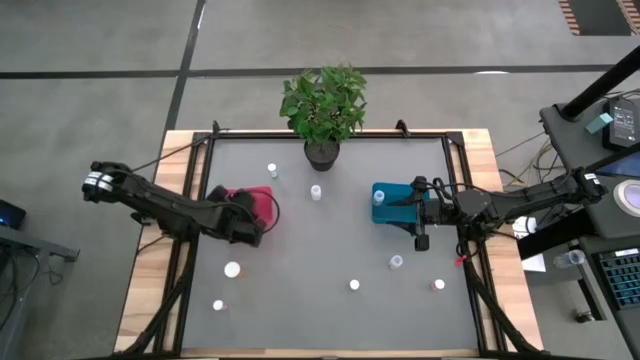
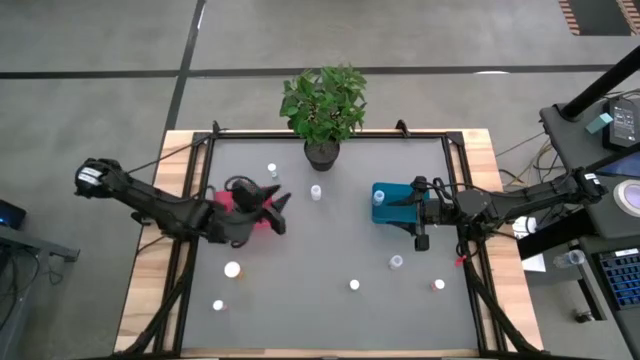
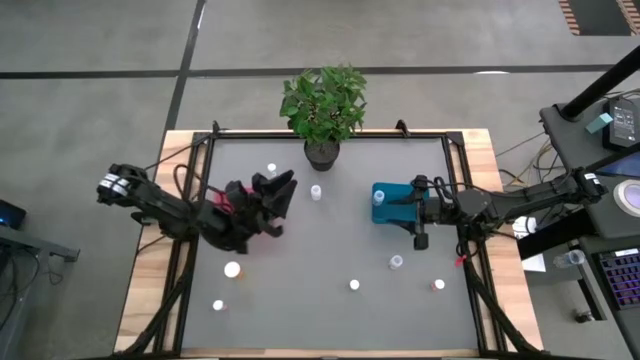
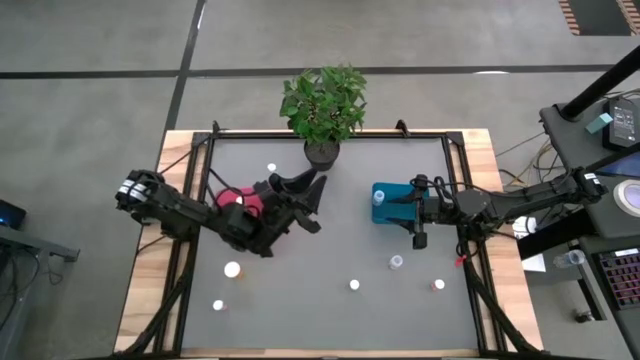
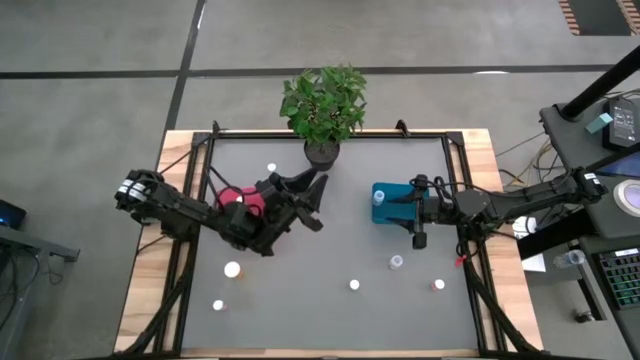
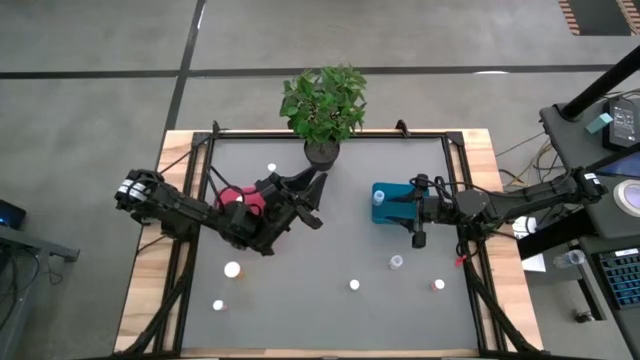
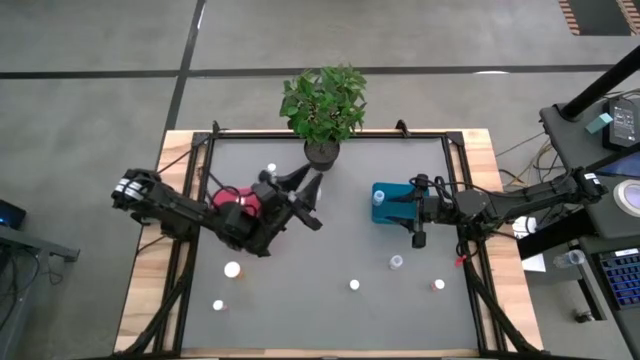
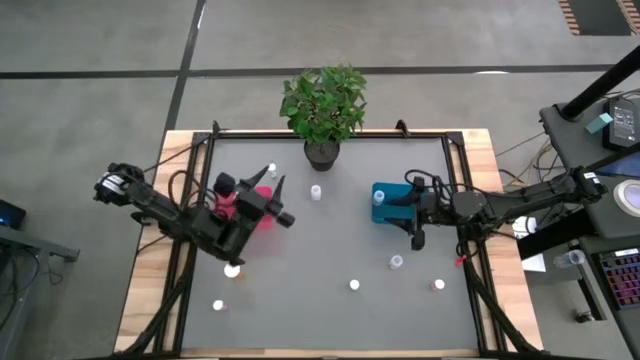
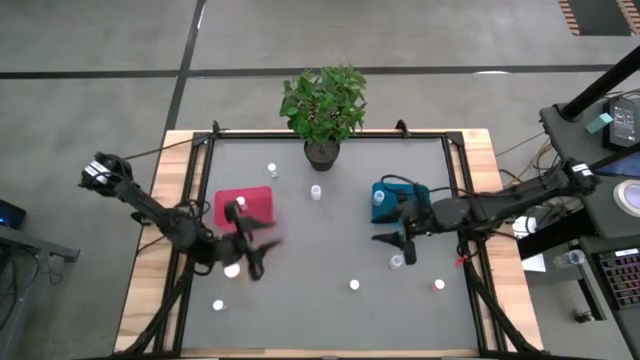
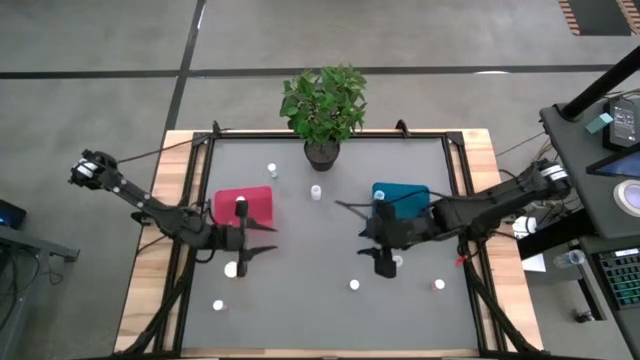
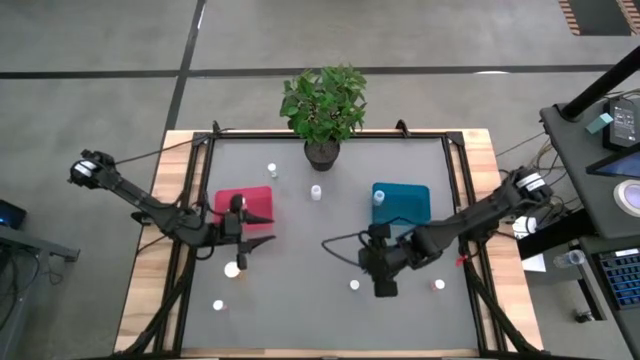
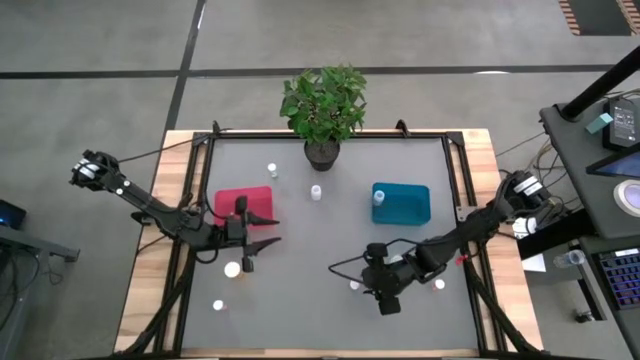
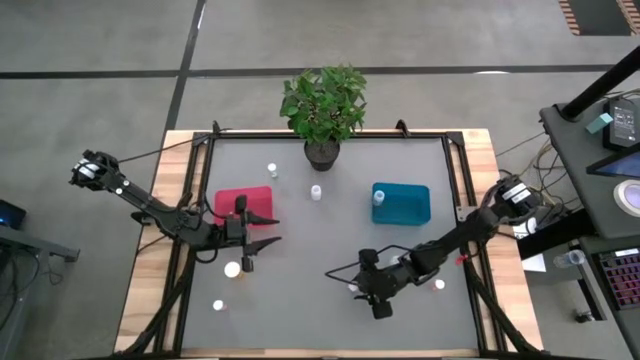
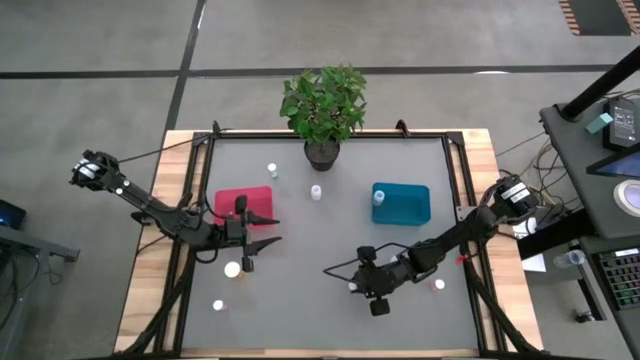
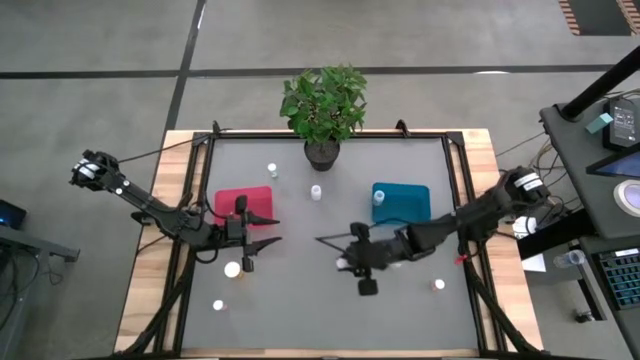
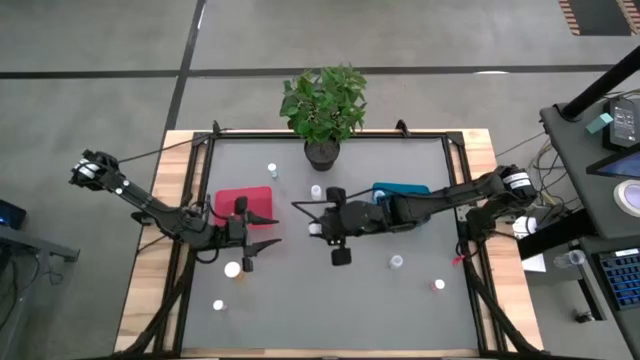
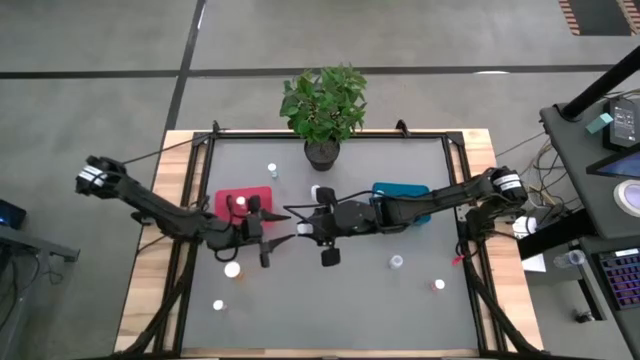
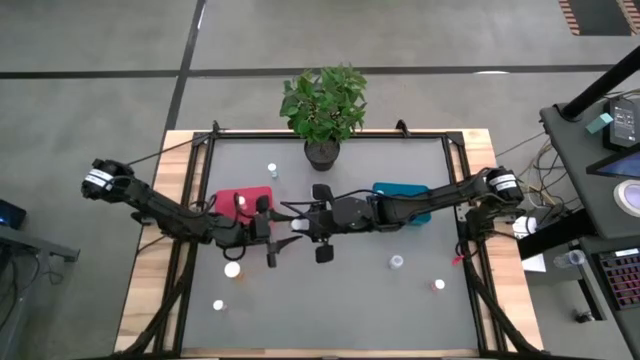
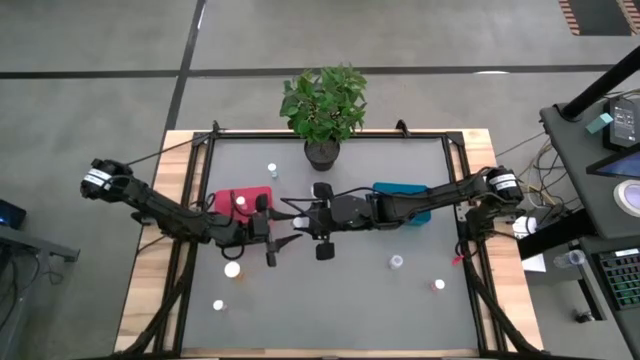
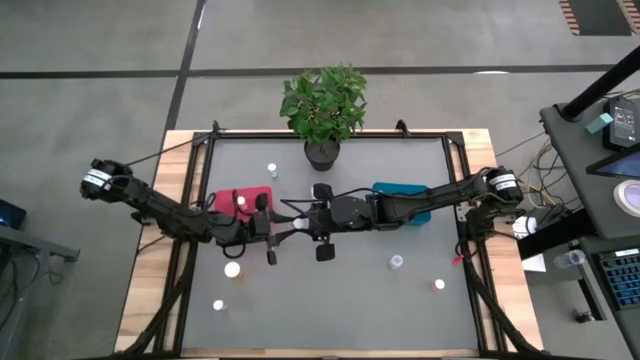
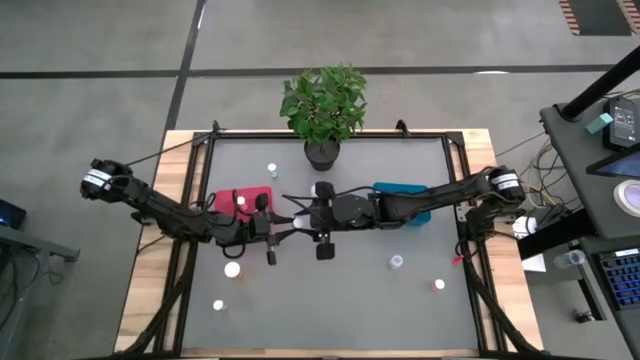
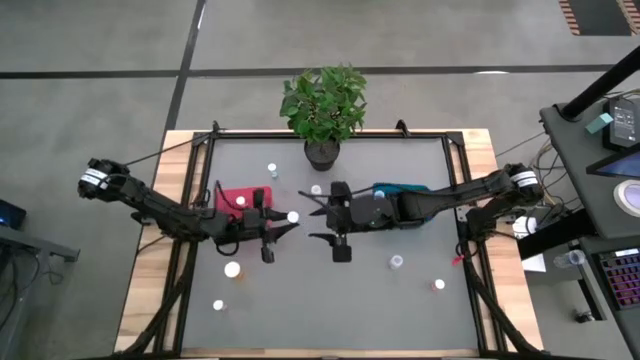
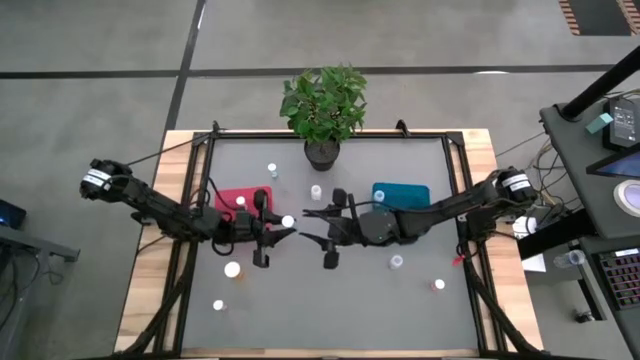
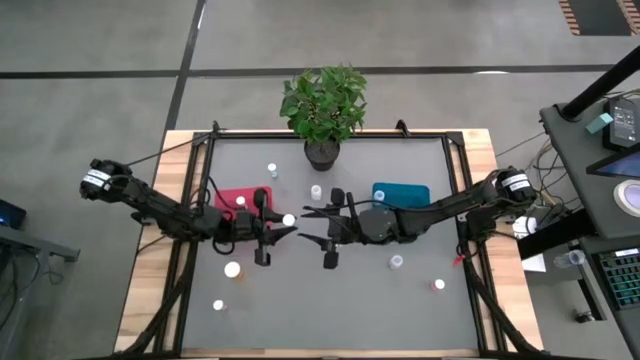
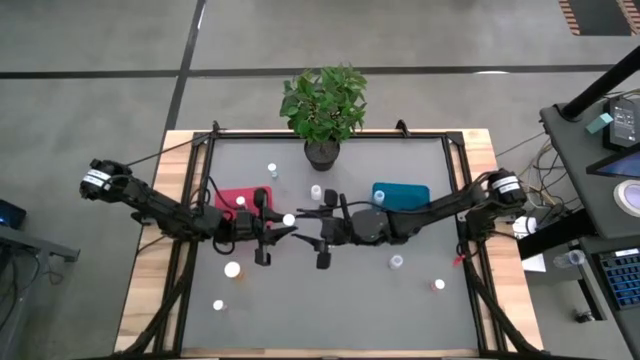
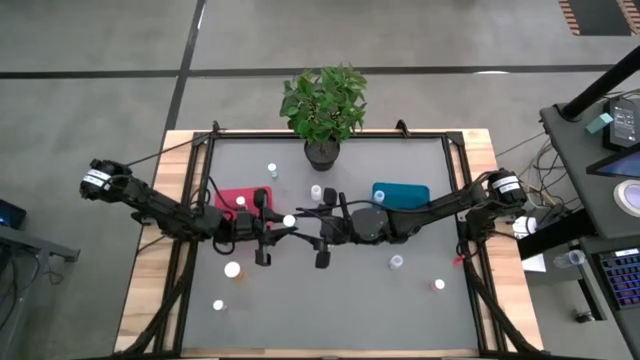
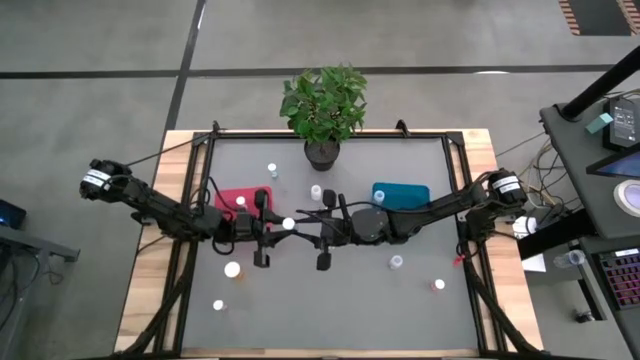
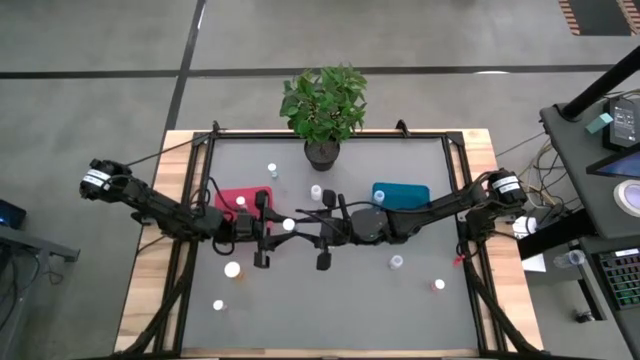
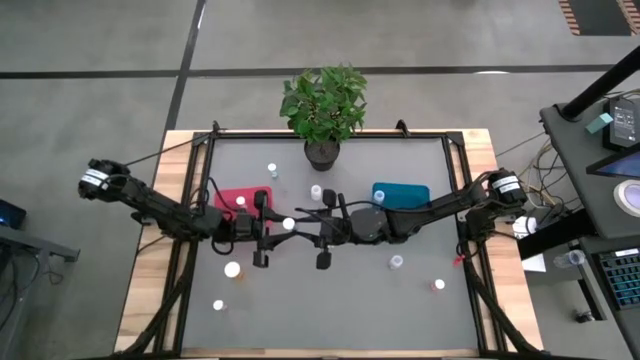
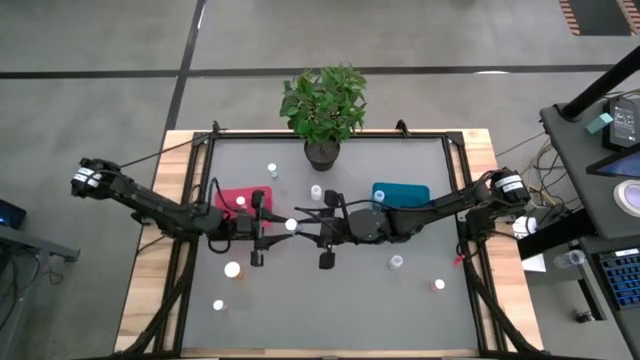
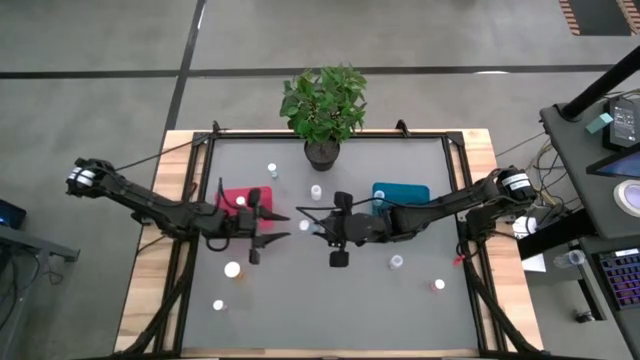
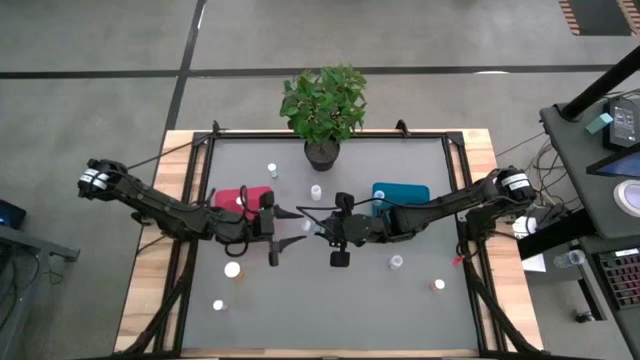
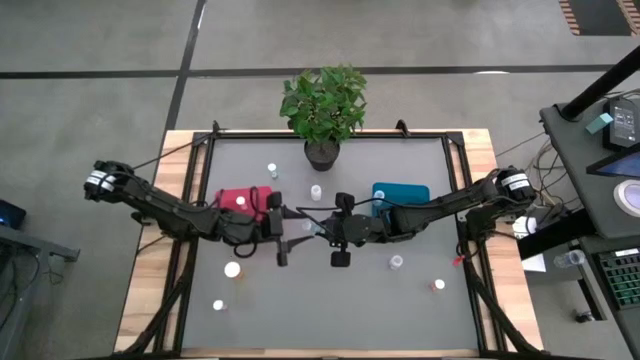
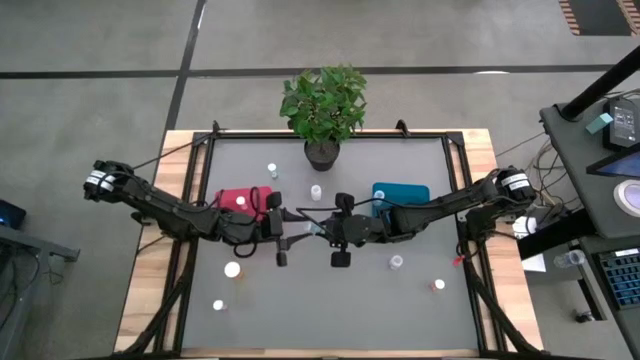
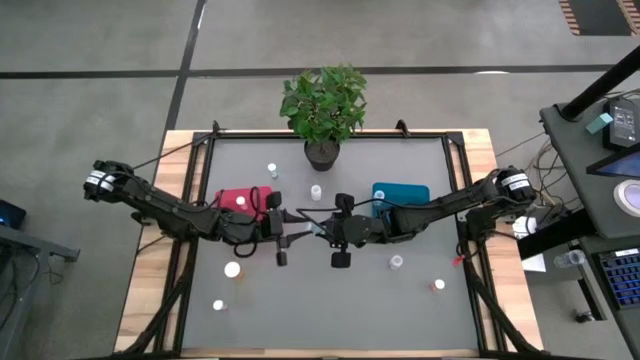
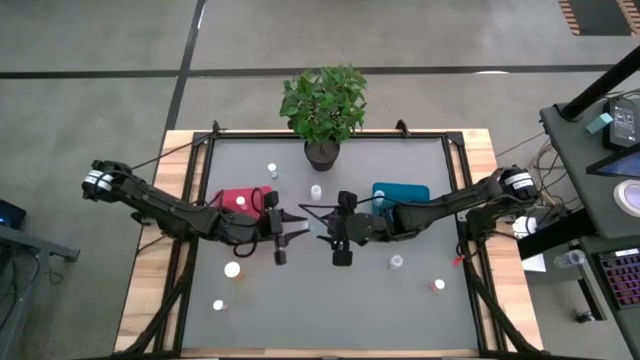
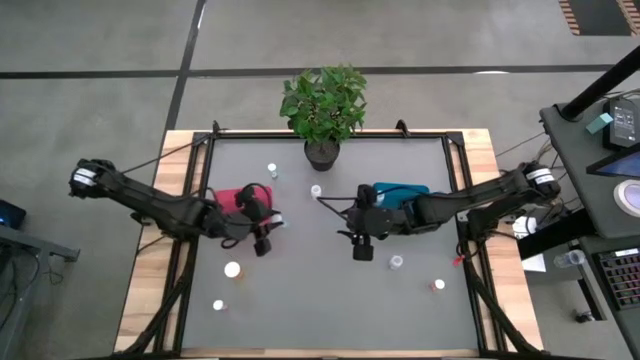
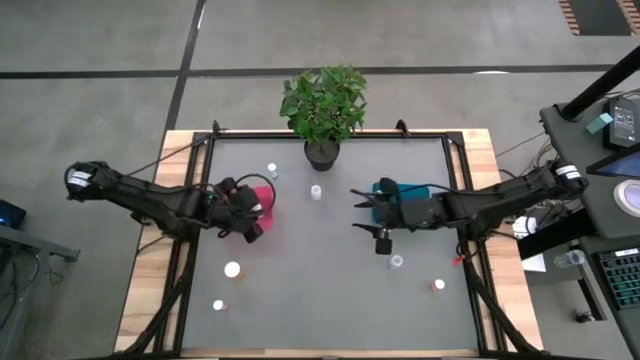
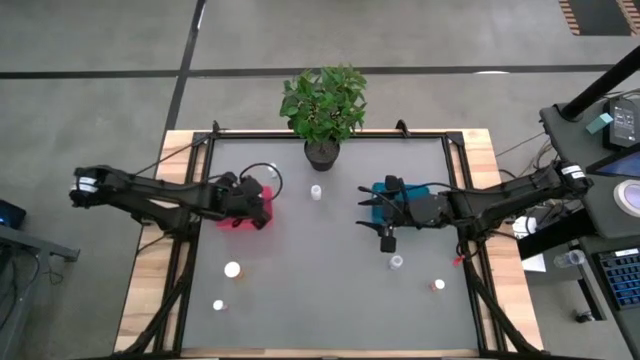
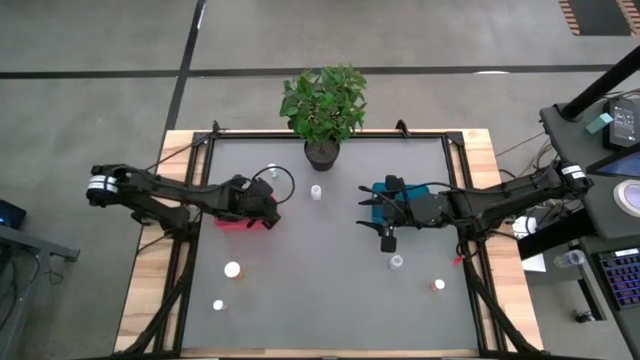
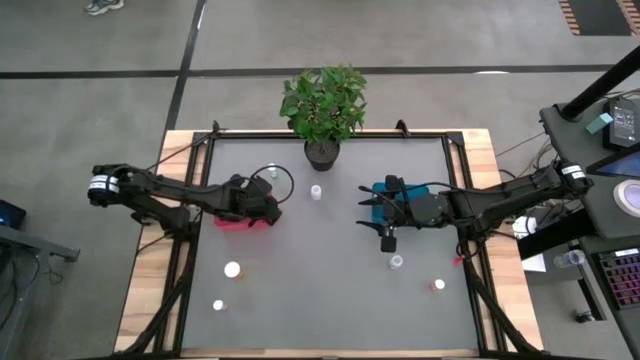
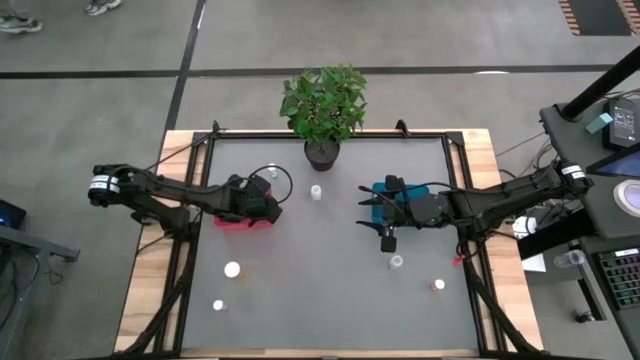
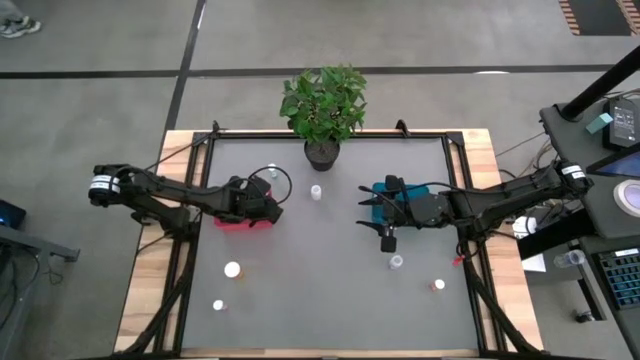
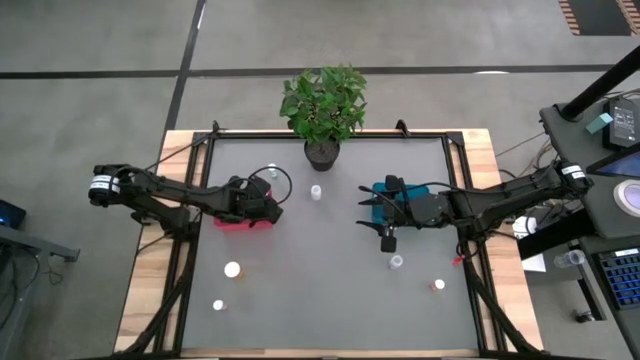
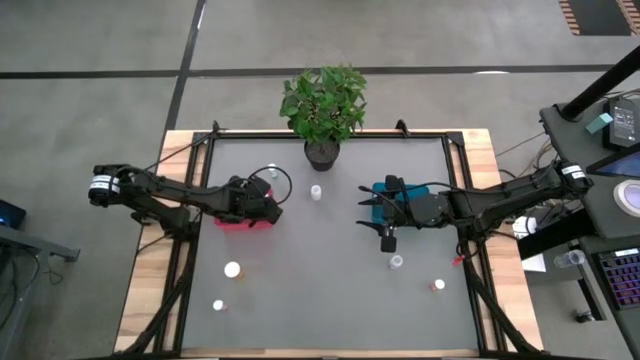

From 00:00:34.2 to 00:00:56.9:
Task: Pick and place medicine bottles into bin by pill shape (circle, oval)
Put the bottom blue tablet bottle into the red bin
